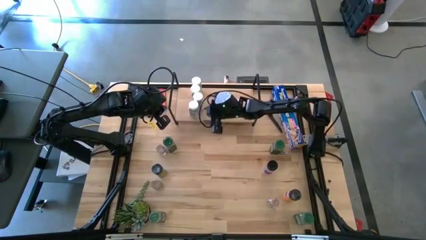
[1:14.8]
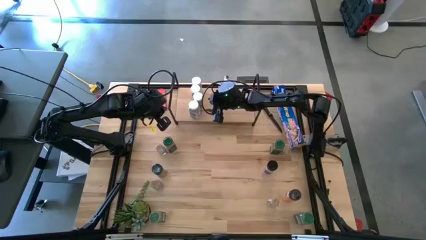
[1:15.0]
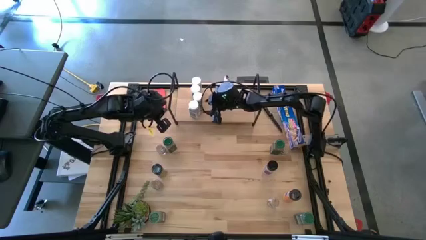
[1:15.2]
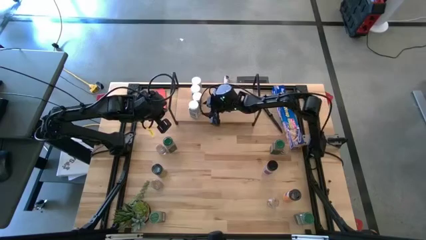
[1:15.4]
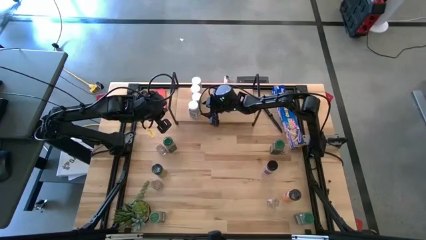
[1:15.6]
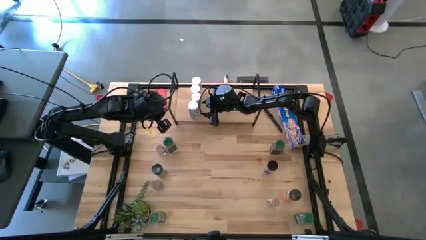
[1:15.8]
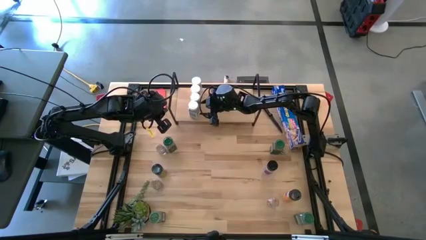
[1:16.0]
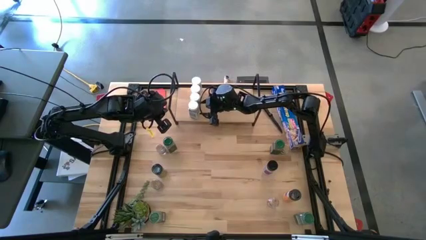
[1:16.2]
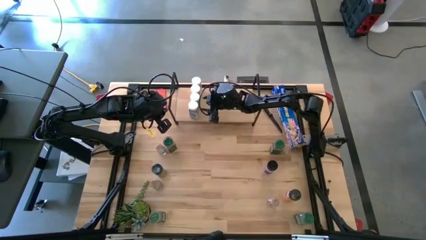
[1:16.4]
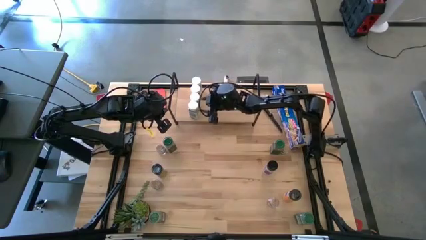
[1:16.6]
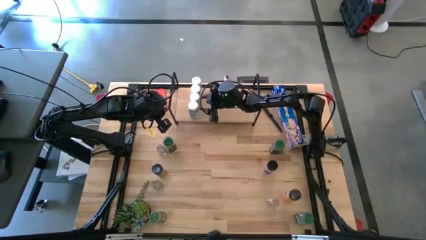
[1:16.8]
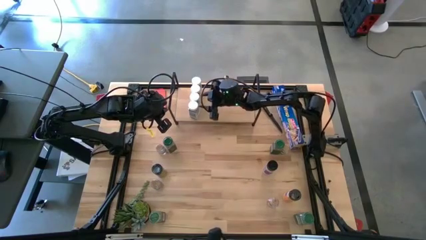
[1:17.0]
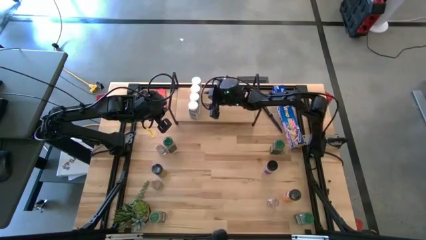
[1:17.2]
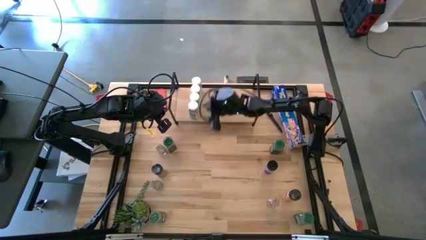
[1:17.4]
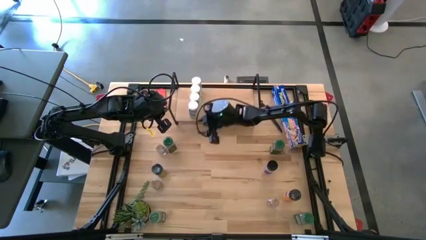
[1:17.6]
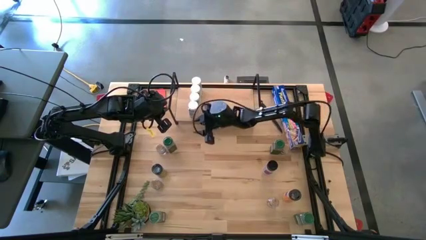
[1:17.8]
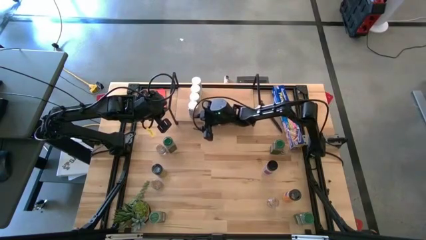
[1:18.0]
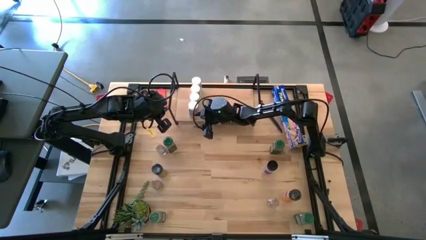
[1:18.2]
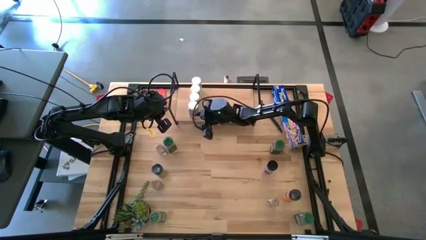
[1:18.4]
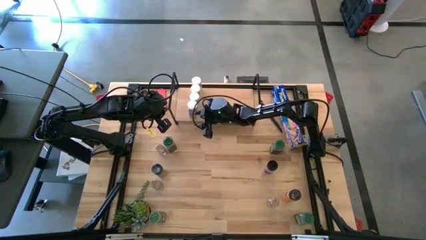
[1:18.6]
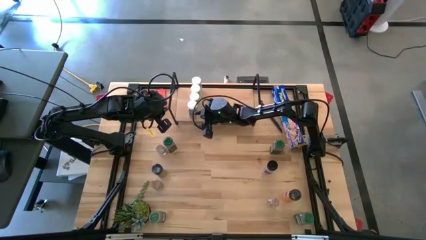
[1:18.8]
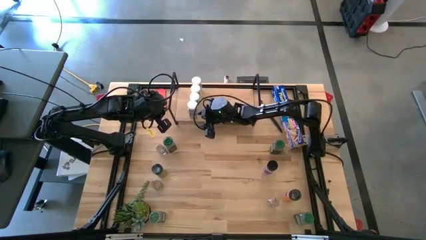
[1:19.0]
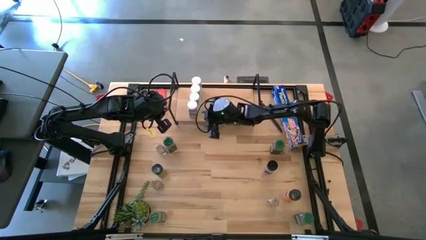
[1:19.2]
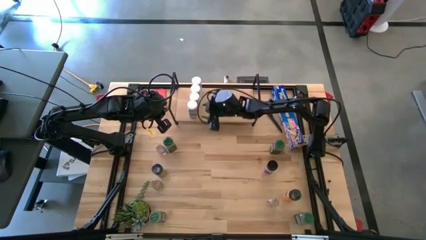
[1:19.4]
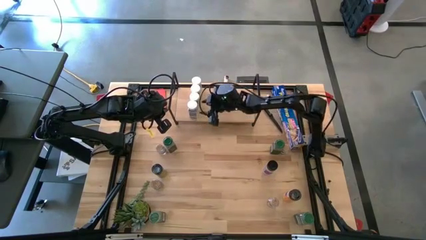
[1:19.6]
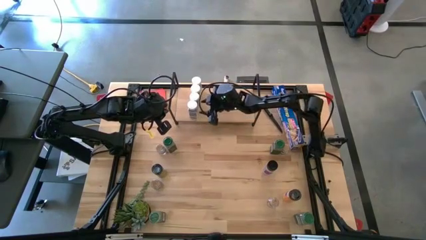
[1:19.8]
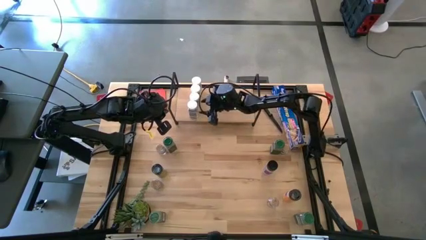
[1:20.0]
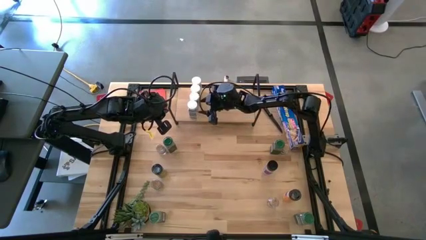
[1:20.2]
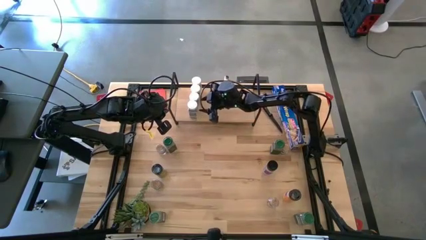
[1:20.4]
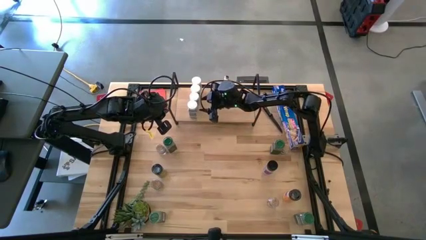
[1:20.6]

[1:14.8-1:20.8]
Task: Shelf spices
Adjust the middle white seasoning bottle on the shelf

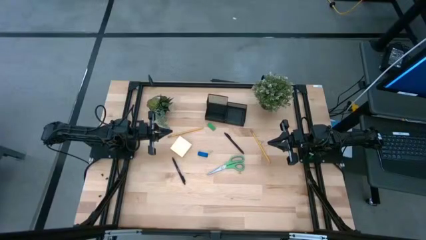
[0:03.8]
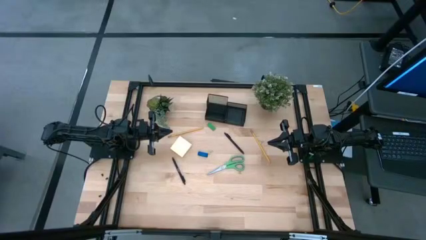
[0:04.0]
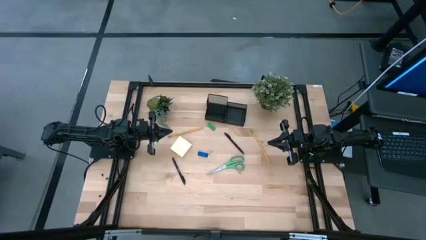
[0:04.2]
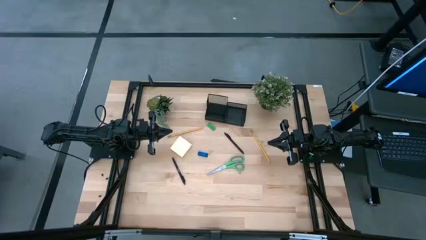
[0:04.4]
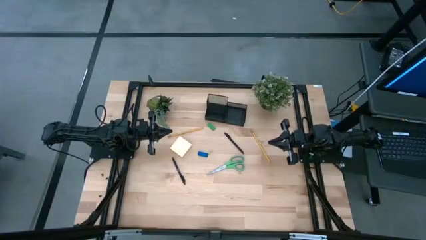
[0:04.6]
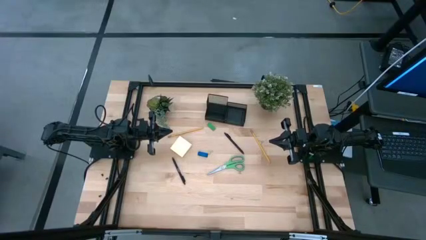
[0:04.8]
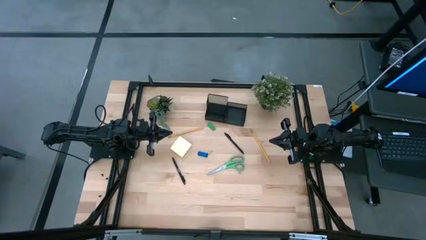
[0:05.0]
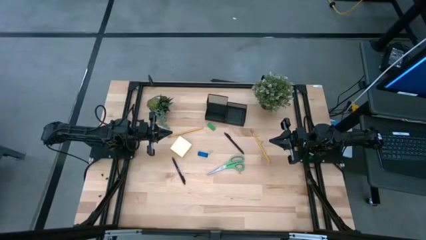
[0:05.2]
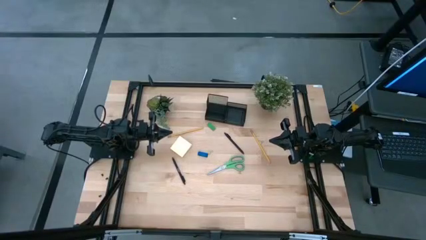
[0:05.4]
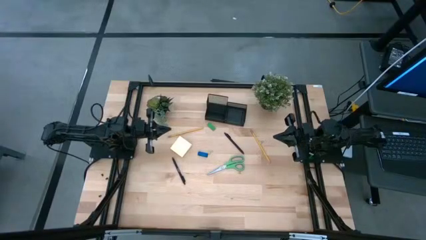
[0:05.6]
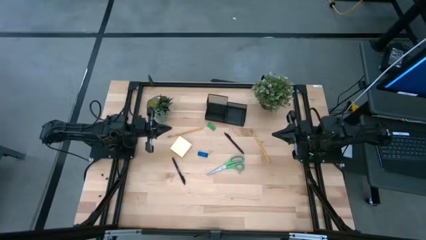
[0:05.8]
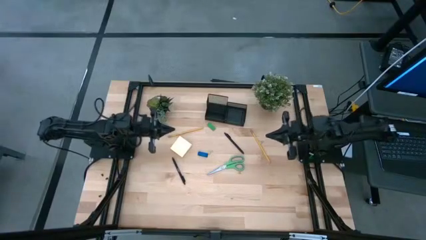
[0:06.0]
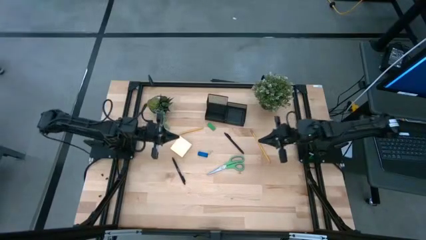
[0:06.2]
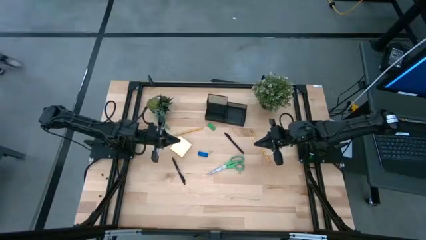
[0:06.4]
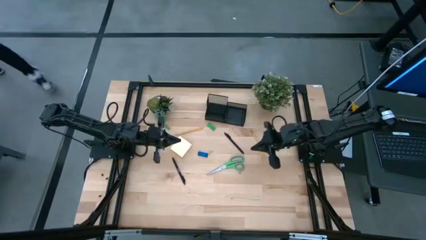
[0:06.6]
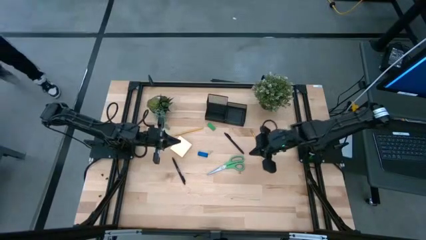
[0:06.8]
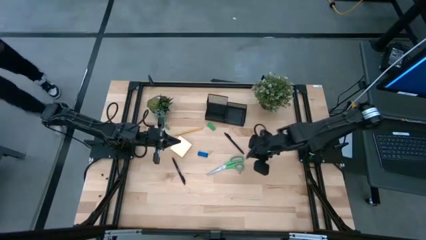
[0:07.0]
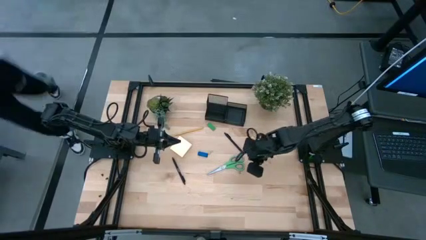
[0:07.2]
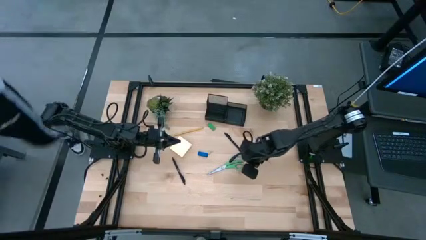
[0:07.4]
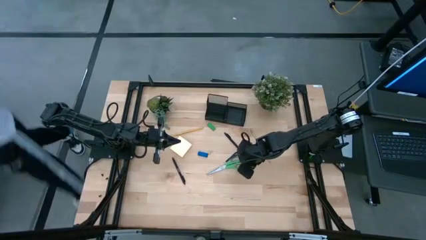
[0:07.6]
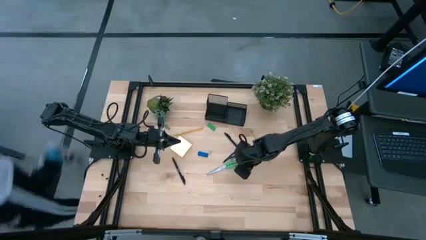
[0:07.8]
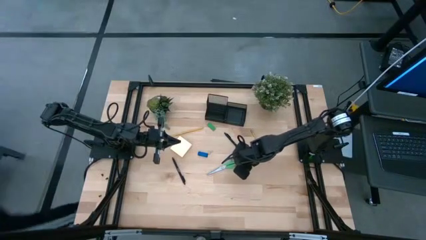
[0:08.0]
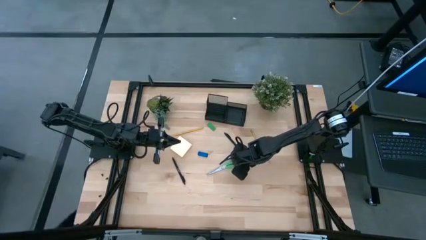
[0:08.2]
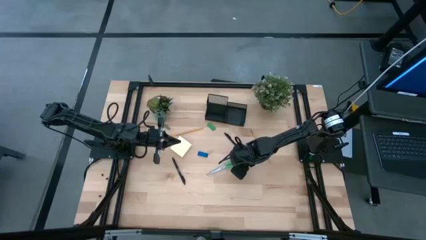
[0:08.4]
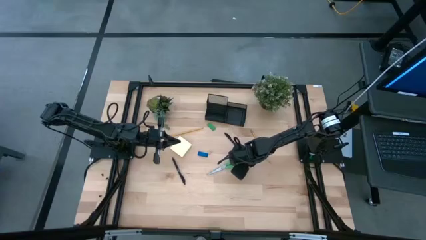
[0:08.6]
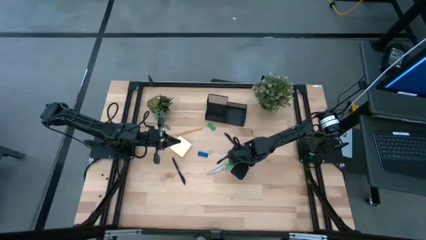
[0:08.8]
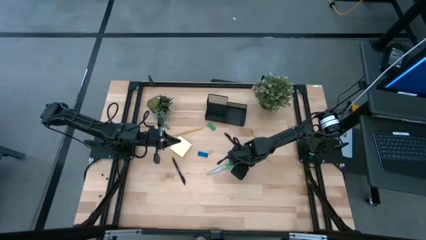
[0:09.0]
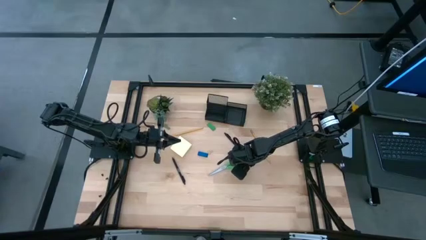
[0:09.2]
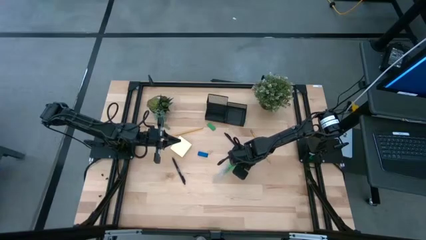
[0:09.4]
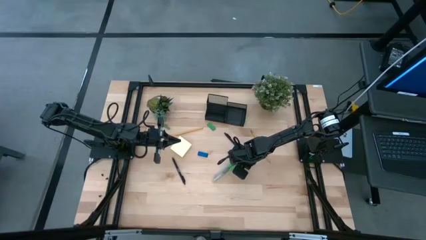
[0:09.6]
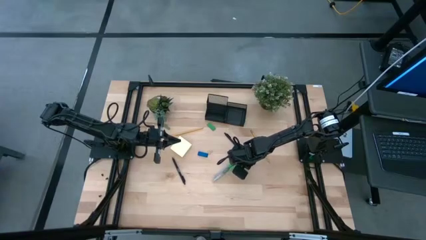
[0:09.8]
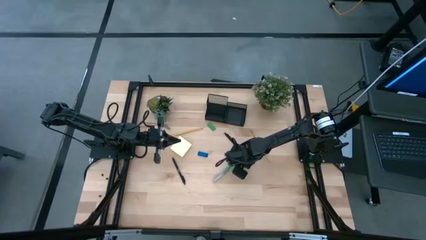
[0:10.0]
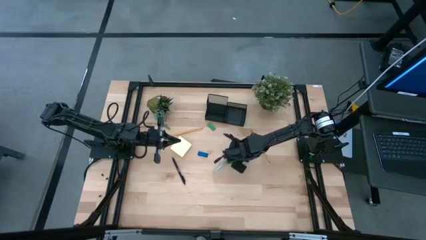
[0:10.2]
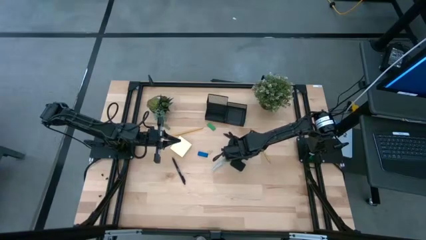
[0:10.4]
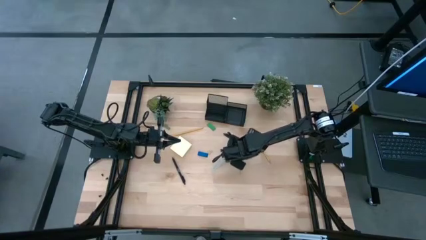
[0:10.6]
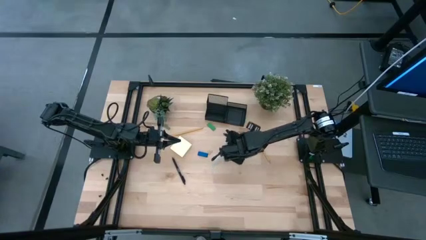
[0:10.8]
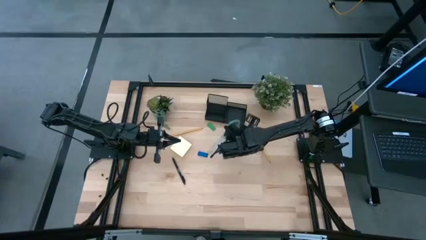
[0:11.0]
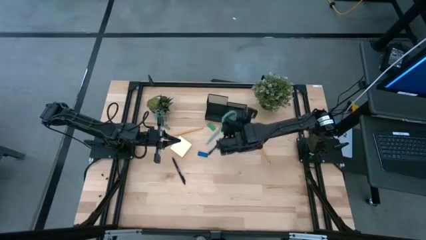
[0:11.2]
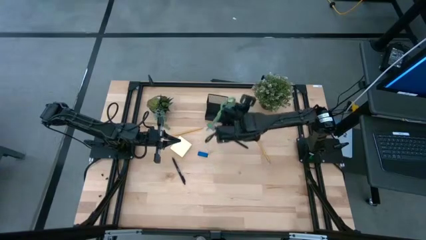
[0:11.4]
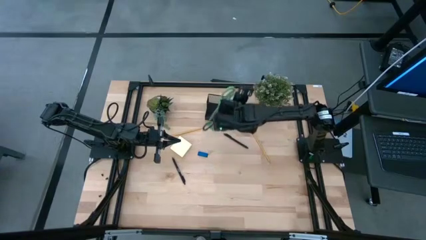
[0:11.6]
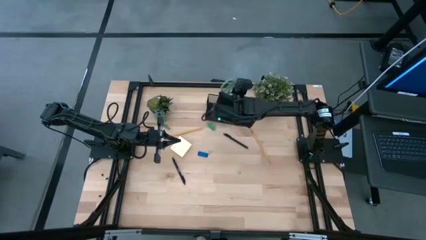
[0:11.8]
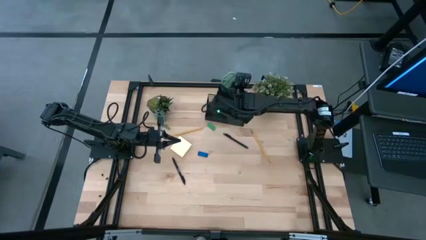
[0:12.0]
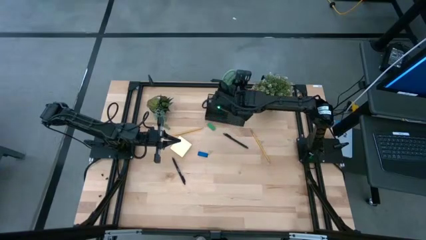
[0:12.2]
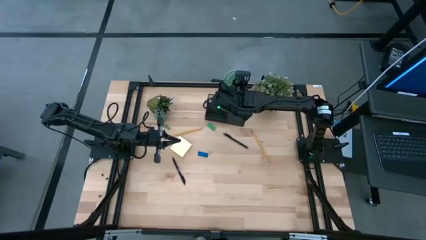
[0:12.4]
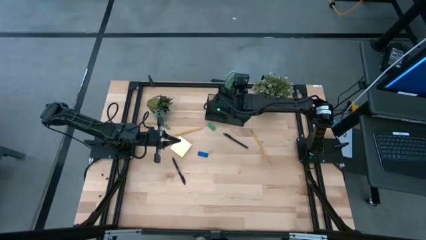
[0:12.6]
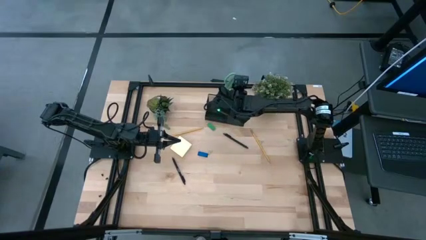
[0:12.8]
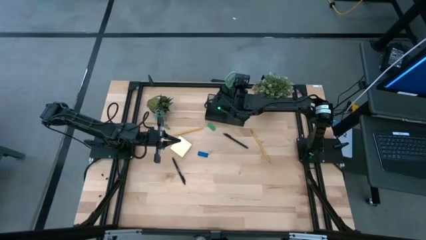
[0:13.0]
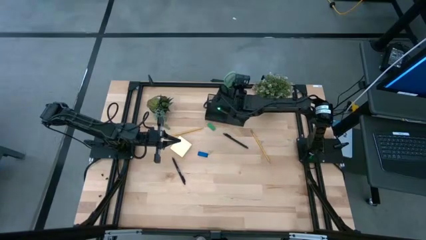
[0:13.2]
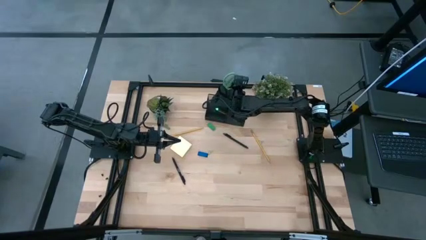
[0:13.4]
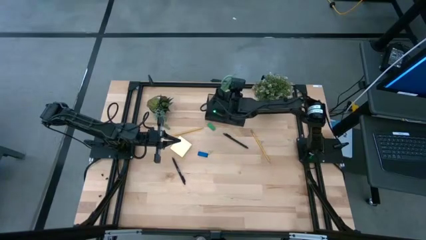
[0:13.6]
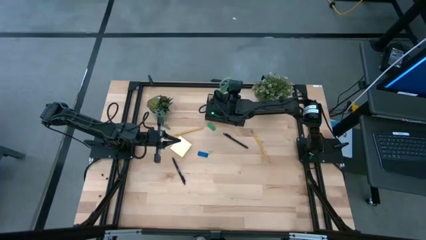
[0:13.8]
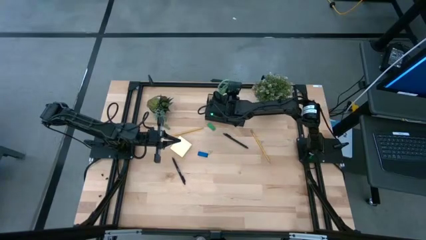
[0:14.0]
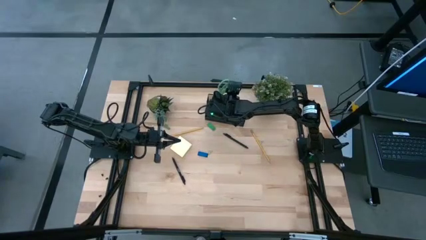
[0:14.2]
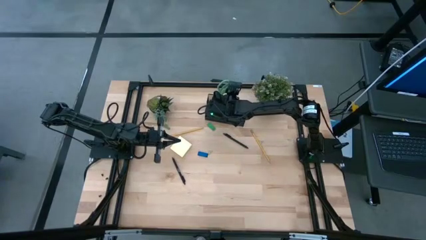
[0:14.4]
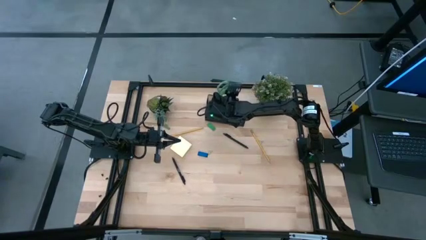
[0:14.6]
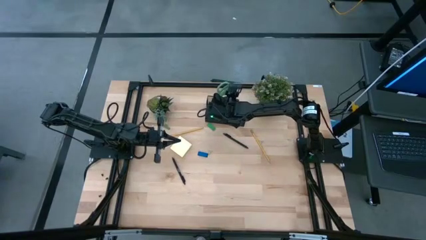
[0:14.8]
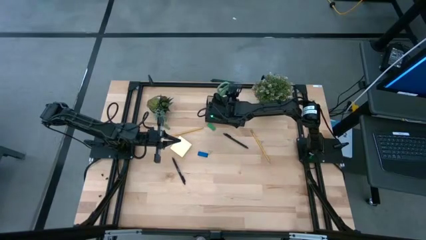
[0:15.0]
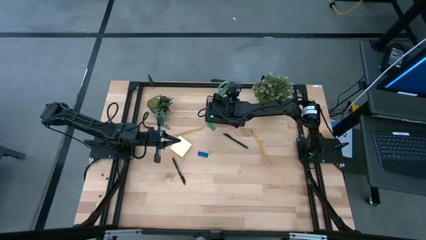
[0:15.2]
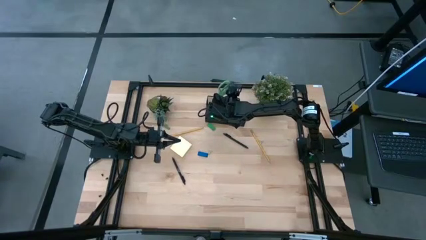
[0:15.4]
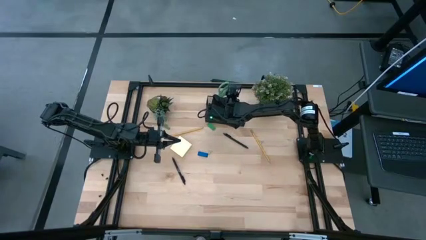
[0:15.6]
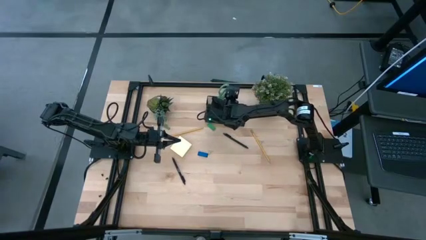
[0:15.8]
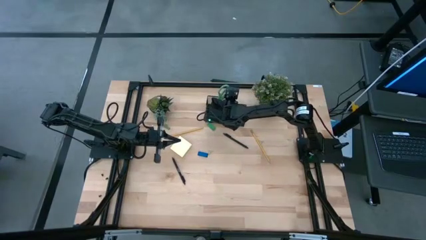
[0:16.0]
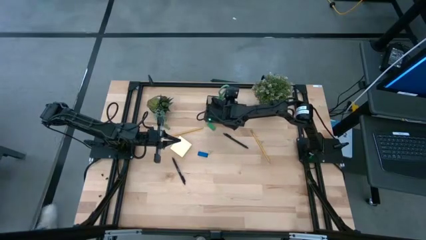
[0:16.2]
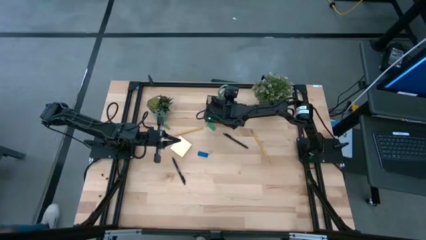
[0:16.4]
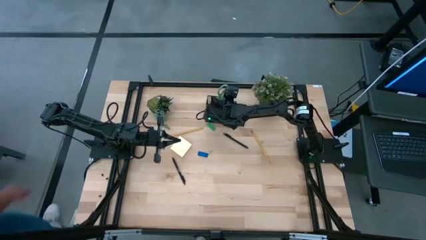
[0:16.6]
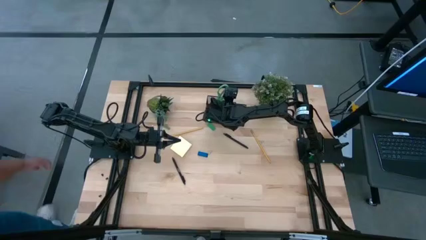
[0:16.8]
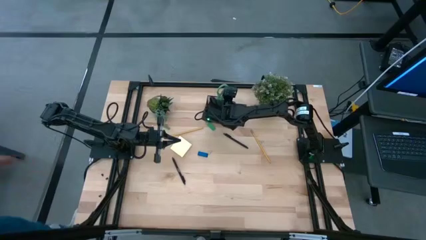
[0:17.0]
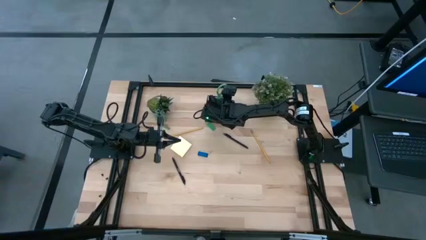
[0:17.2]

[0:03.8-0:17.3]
Task: Pick and place office supplies into organizer
Put the green scissors into the black desk organizer
